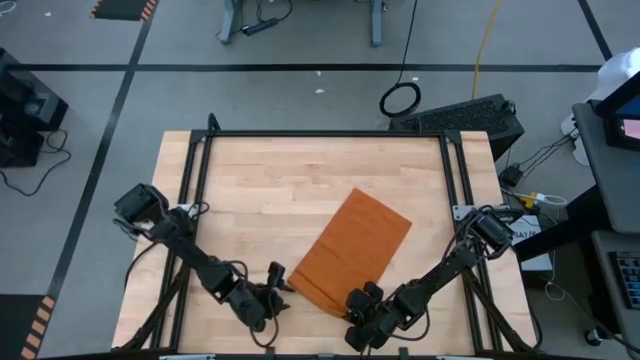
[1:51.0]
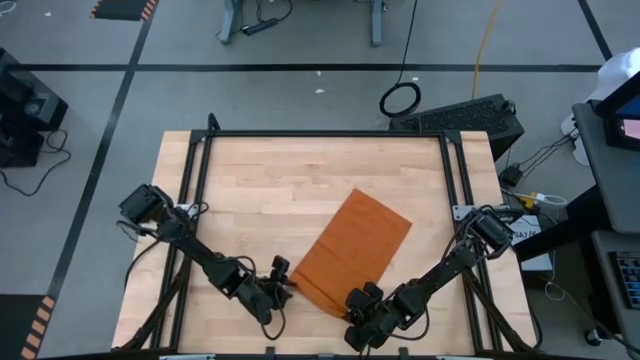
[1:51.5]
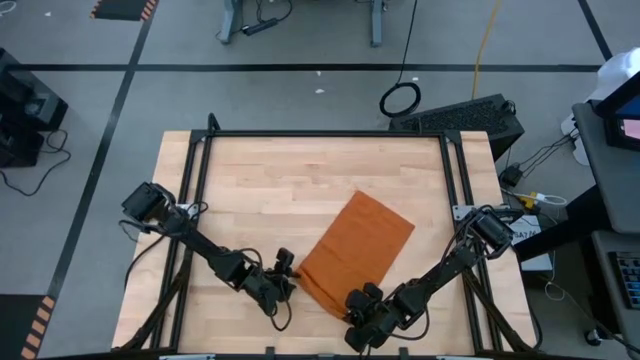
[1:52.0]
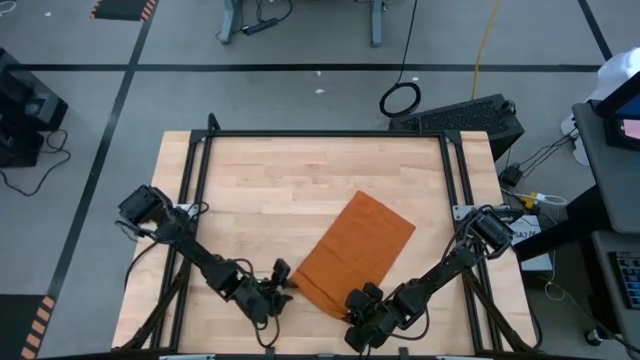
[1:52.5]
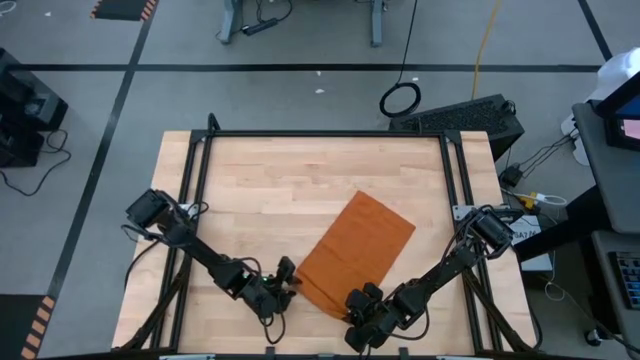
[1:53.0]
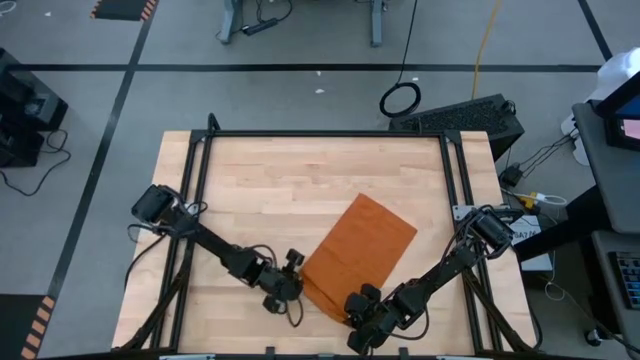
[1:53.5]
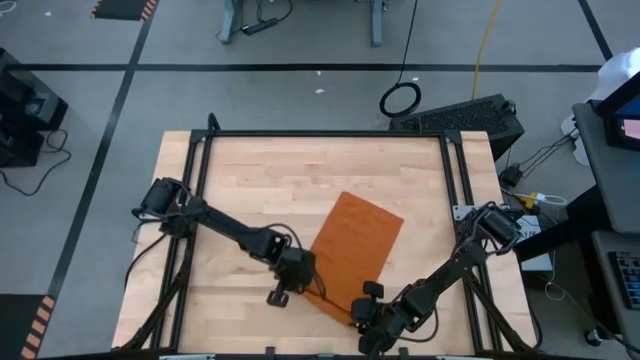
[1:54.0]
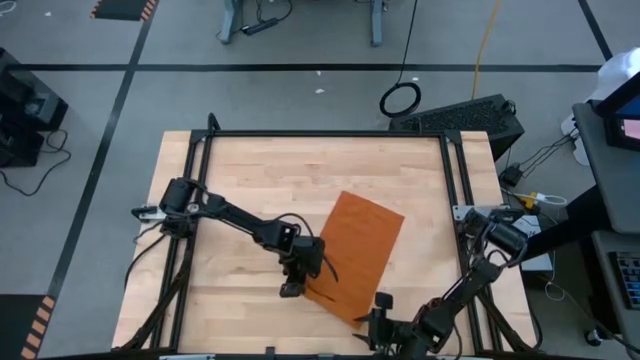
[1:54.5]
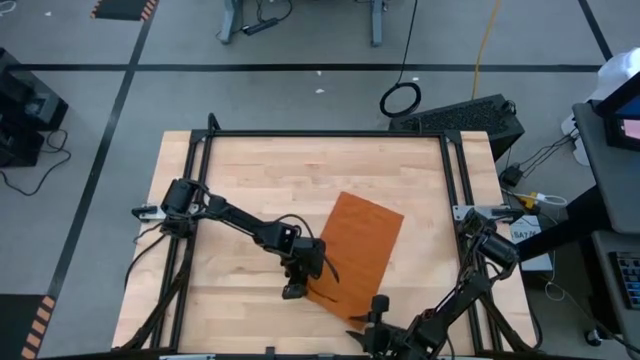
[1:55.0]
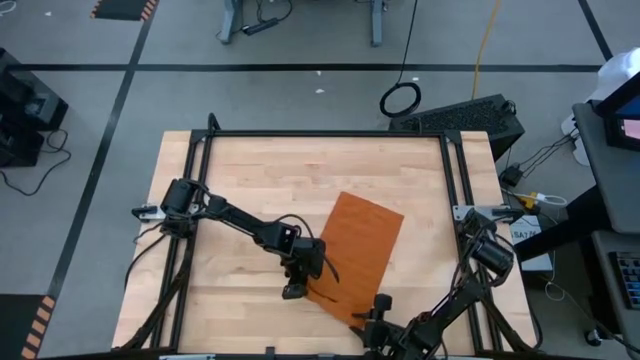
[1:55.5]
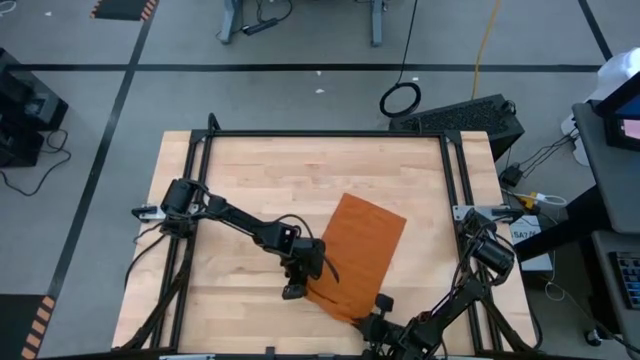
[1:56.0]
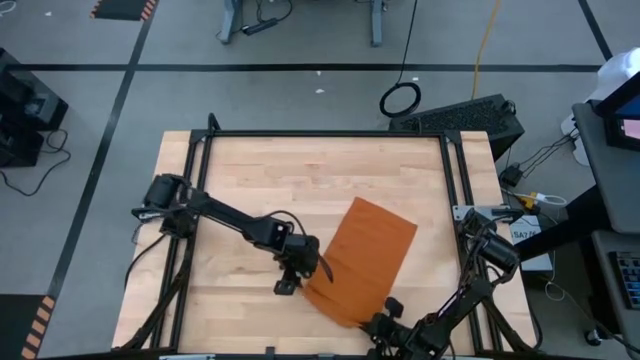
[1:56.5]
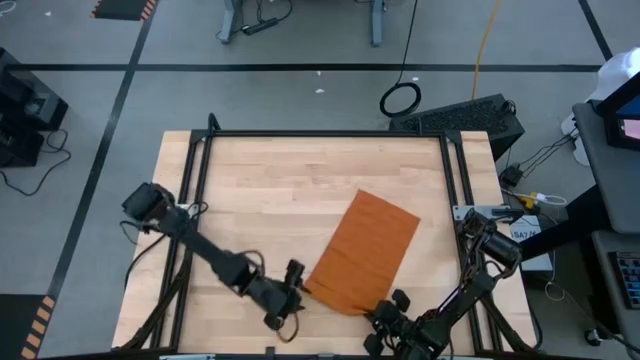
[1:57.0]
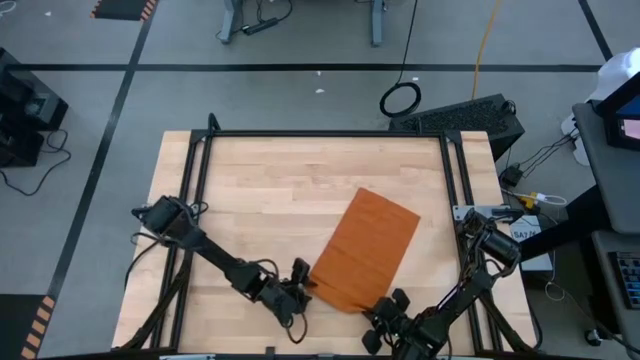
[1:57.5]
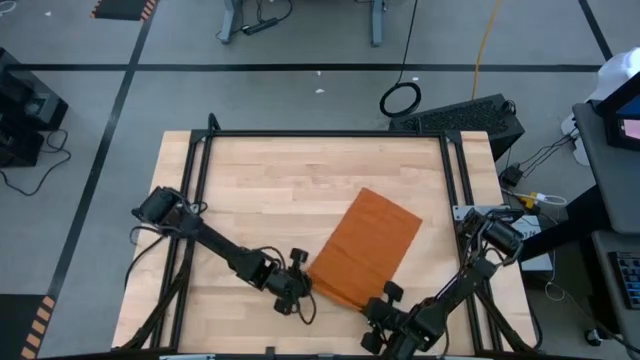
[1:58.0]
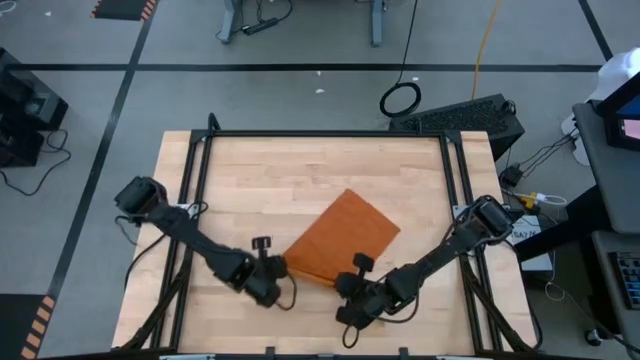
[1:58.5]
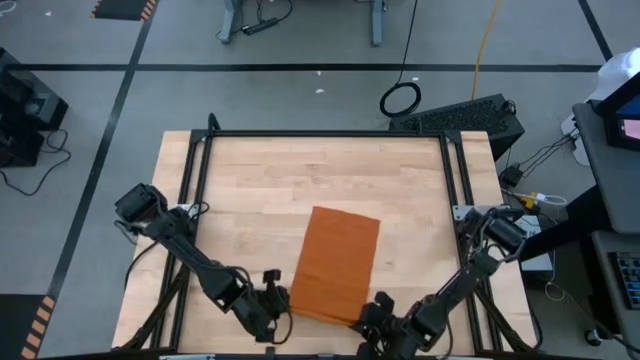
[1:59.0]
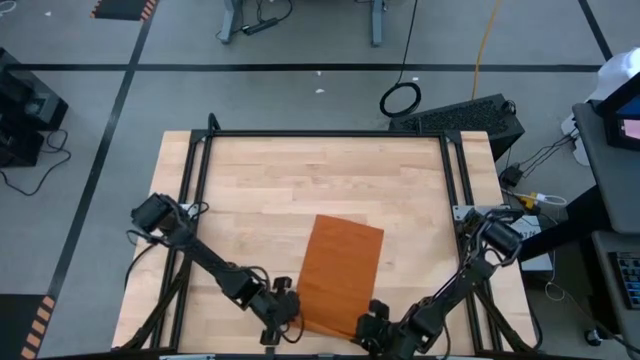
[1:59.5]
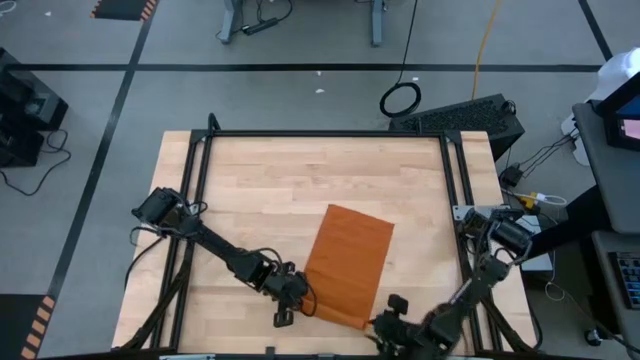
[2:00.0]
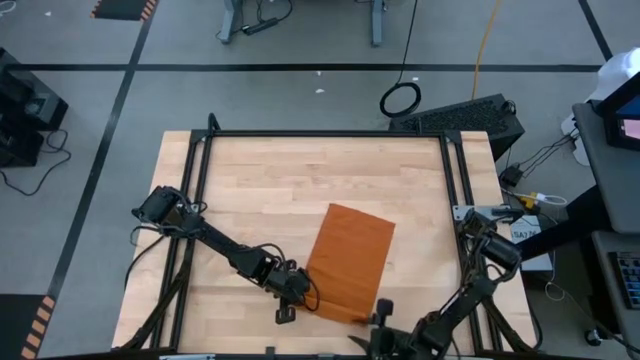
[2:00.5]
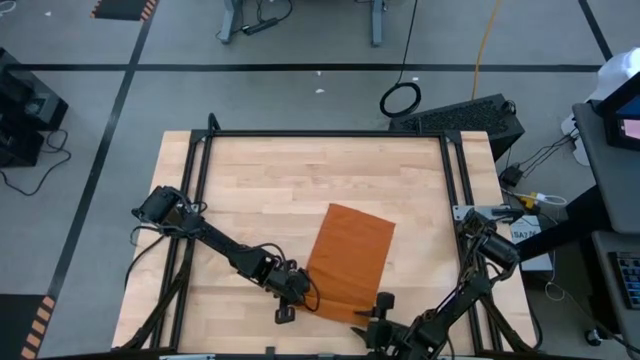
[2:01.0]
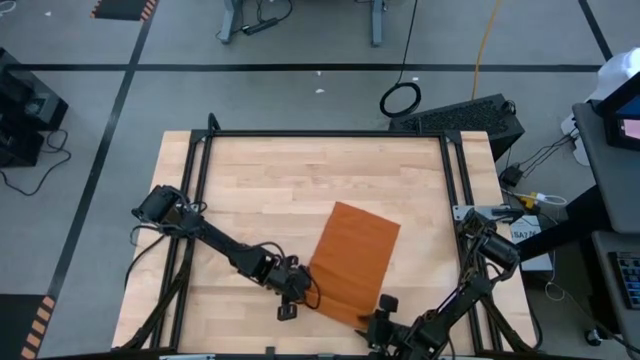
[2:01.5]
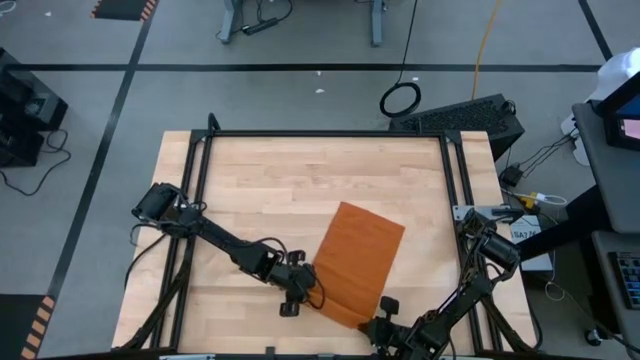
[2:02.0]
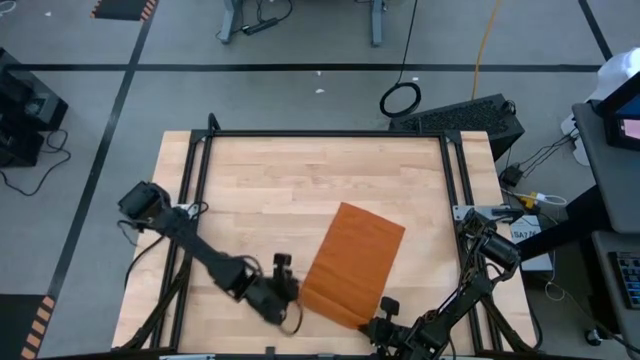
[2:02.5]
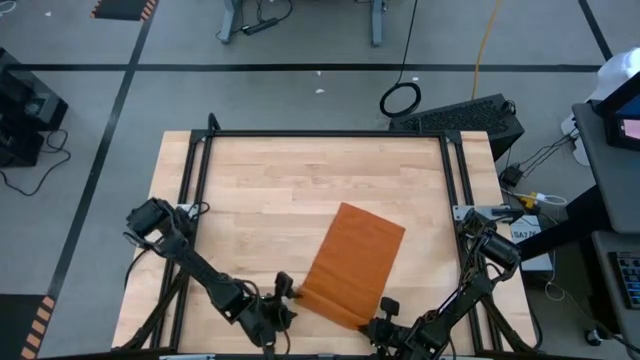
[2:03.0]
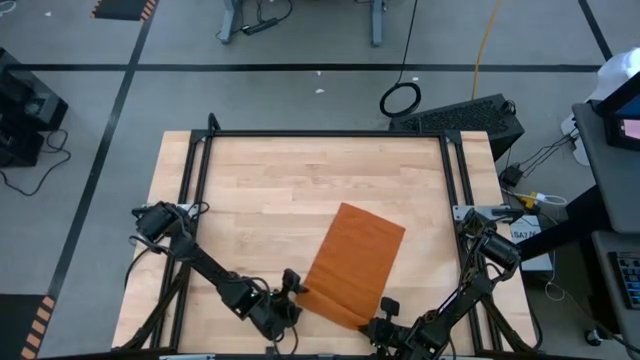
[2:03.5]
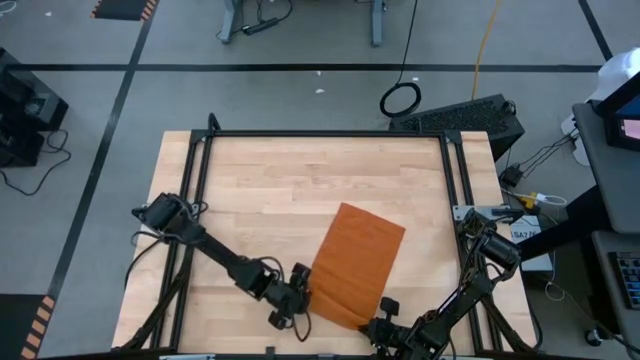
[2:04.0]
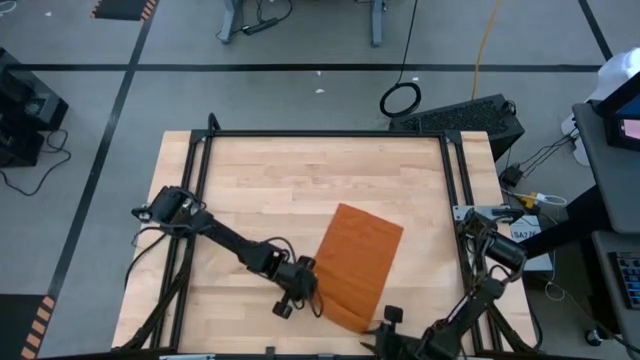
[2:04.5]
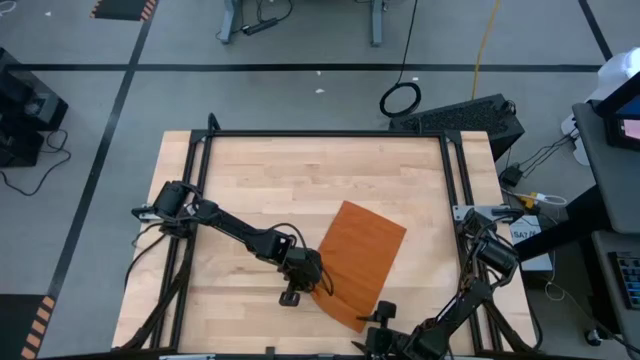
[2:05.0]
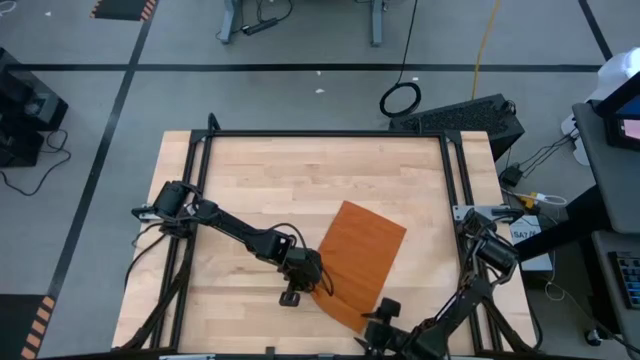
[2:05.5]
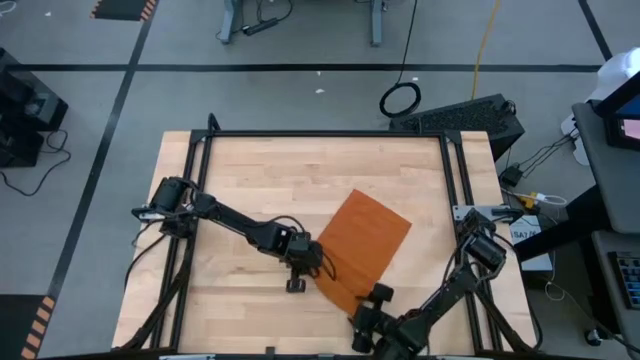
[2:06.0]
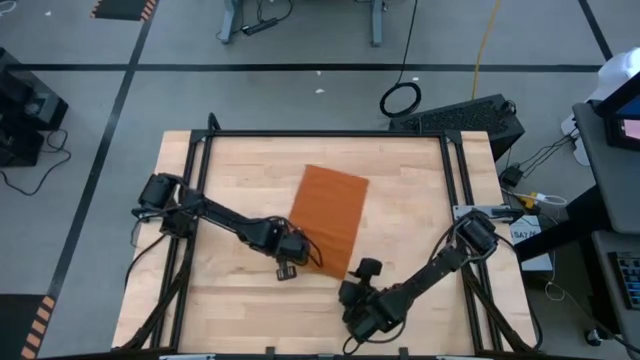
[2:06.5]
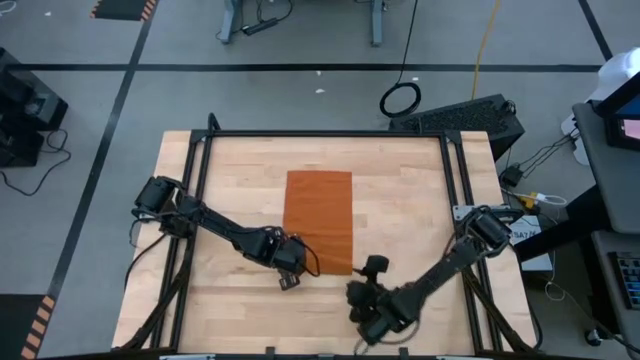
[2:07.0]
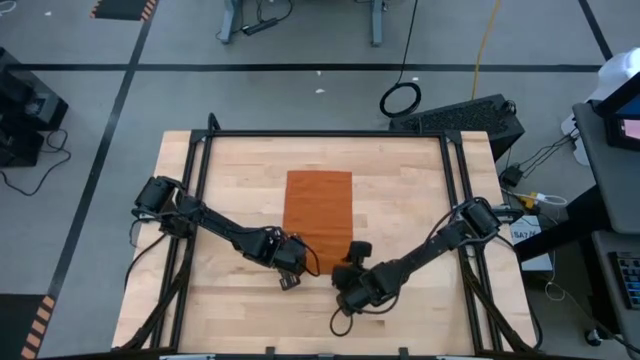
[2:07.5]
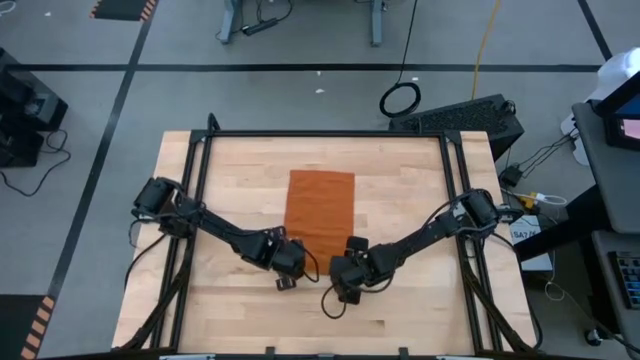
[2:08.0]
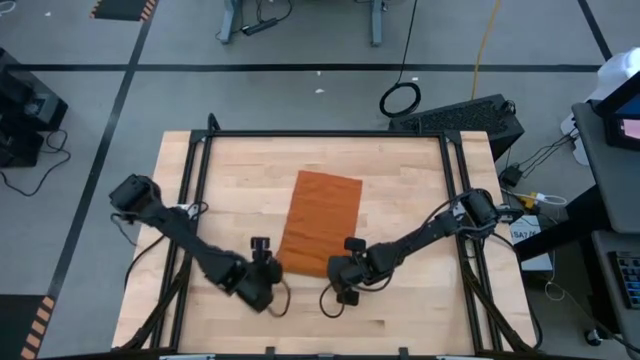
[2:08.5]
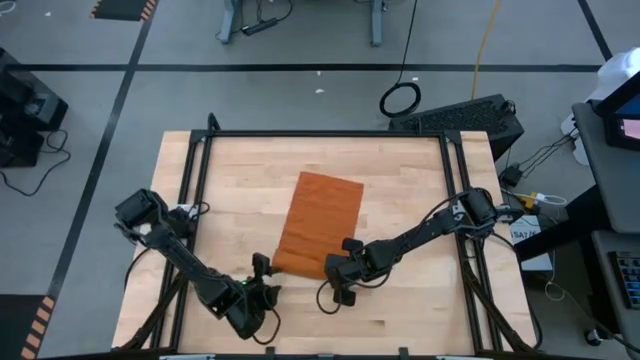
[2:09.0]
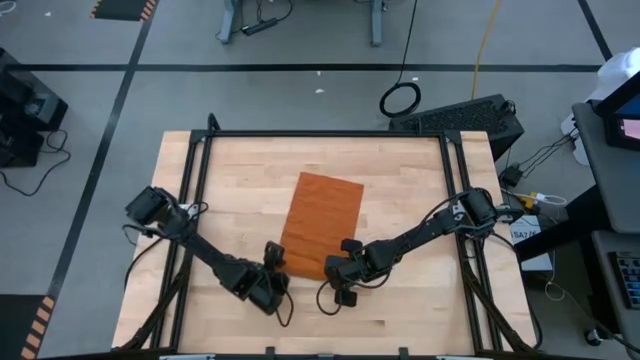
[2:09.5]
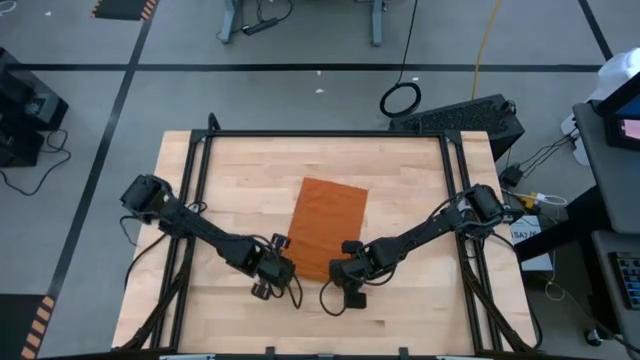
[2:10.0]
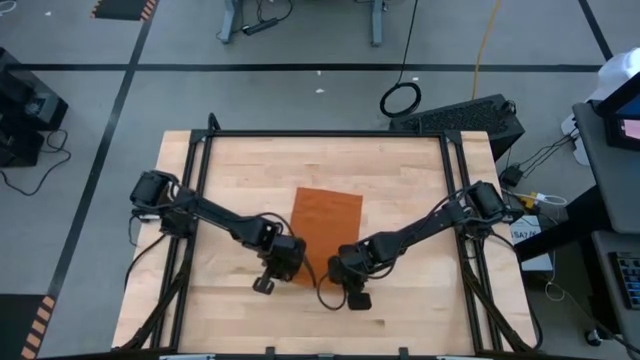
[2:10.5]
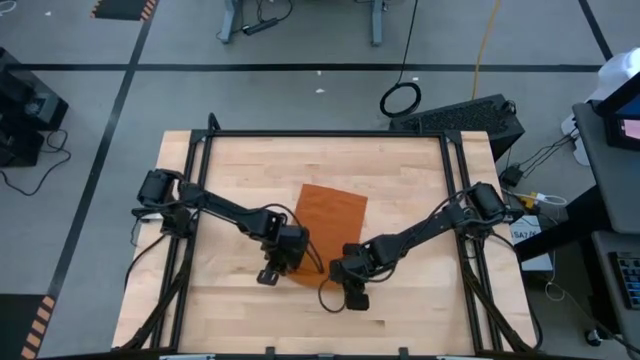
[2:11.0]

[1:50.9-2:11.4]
Task: Roll towel into tight, uniform cylinder
Roll the brown towel

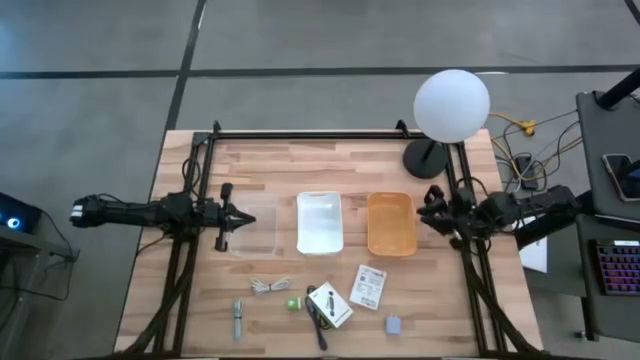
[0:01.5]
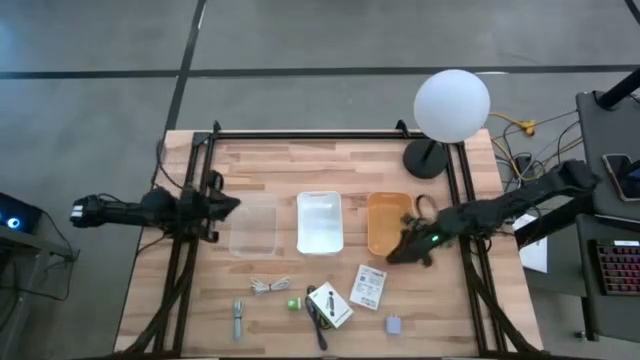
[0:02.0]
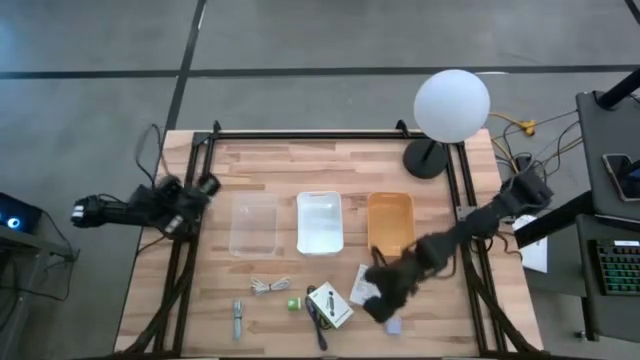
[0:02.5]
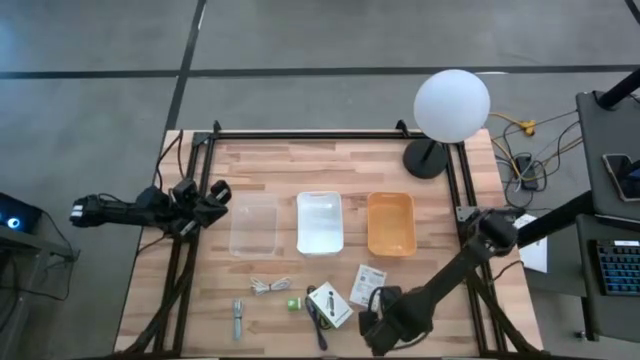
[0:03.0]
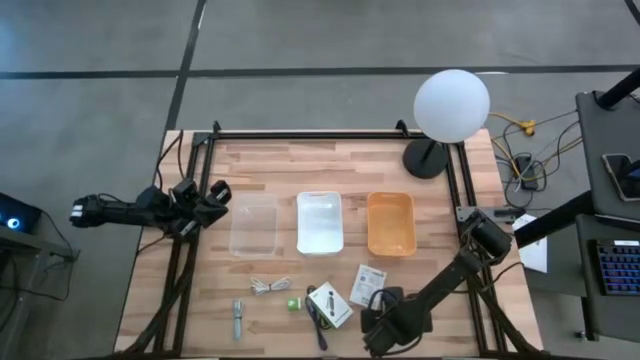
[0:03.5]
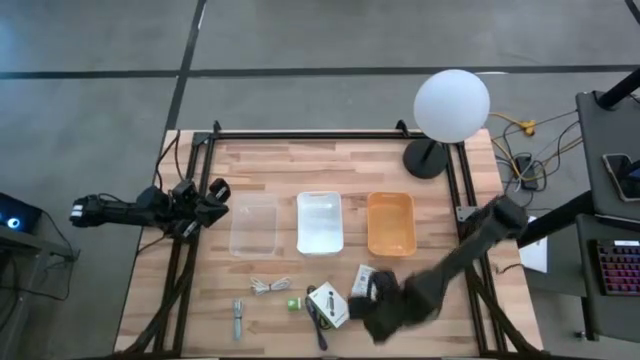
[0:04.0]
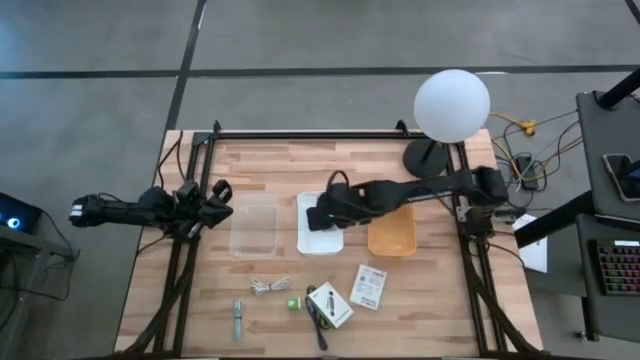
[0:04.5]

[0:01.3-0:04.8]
Task: Pick and place items into bin
Put the light violet charger adapter into the white bin
